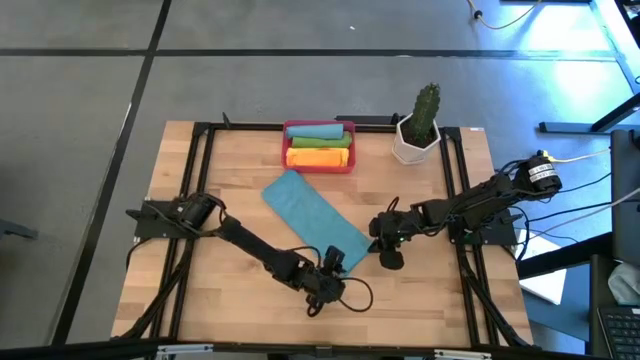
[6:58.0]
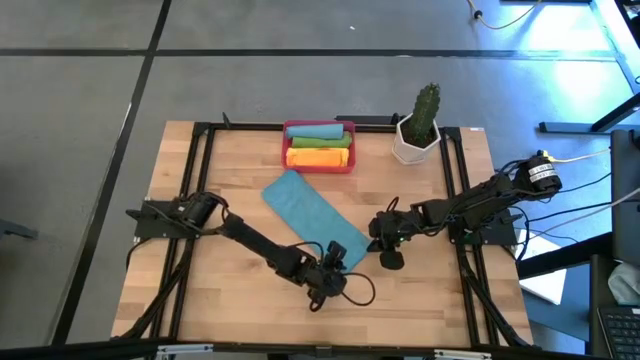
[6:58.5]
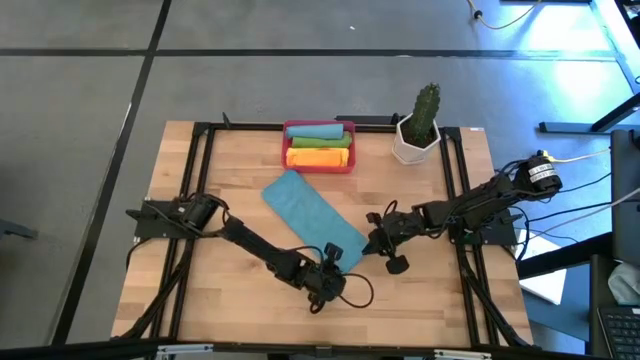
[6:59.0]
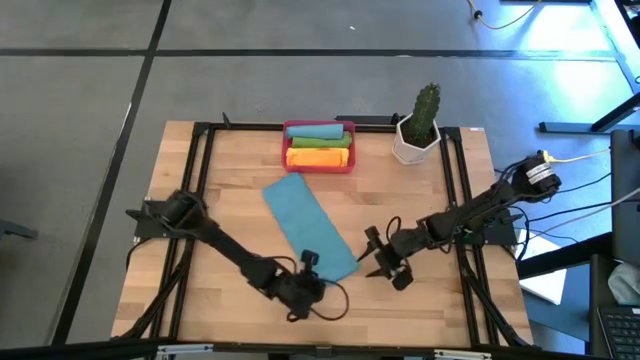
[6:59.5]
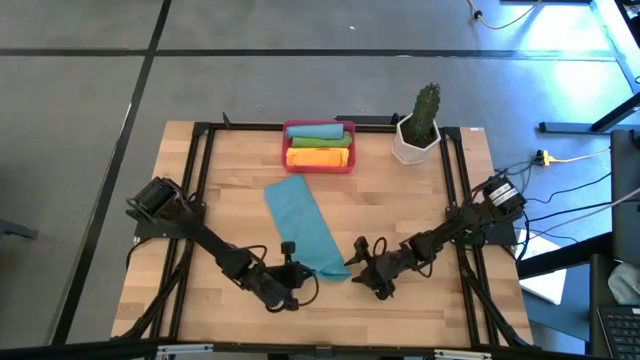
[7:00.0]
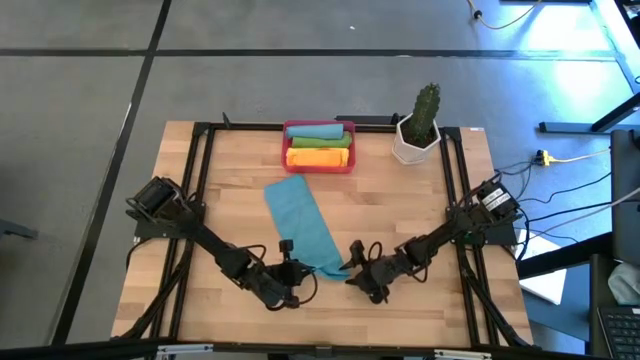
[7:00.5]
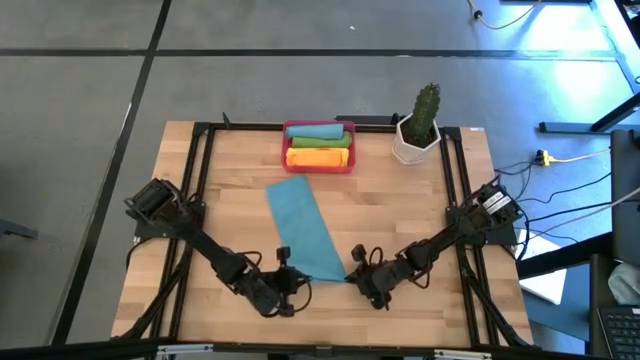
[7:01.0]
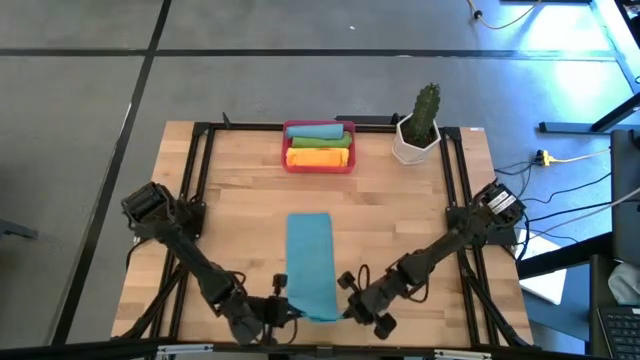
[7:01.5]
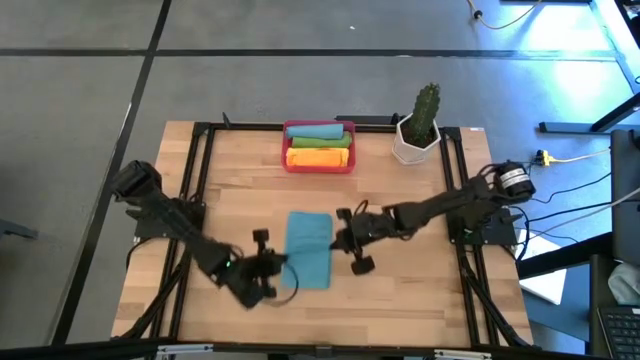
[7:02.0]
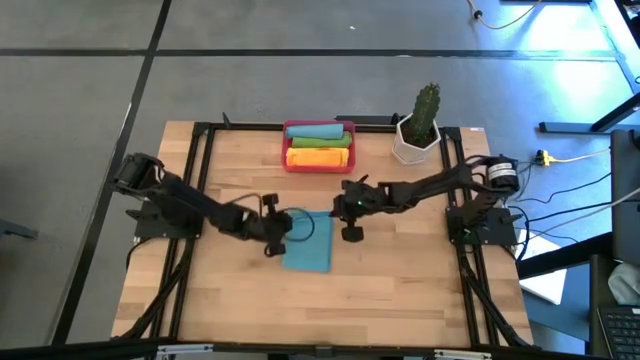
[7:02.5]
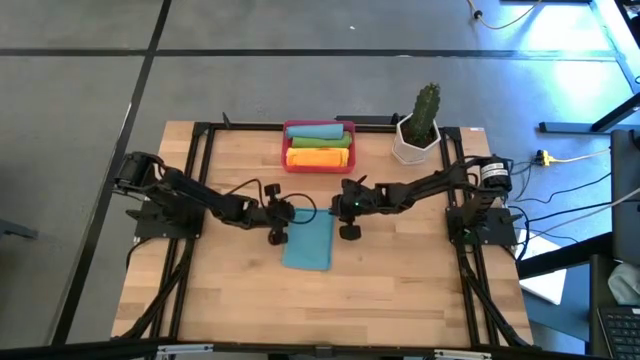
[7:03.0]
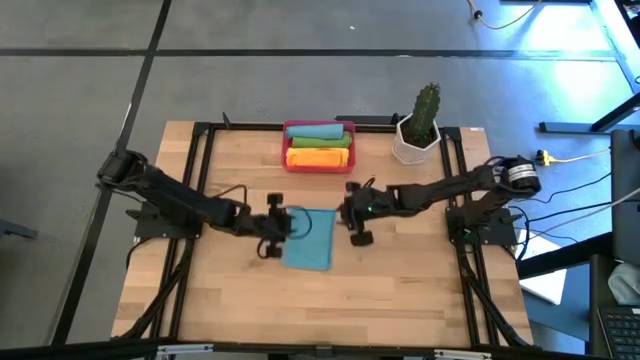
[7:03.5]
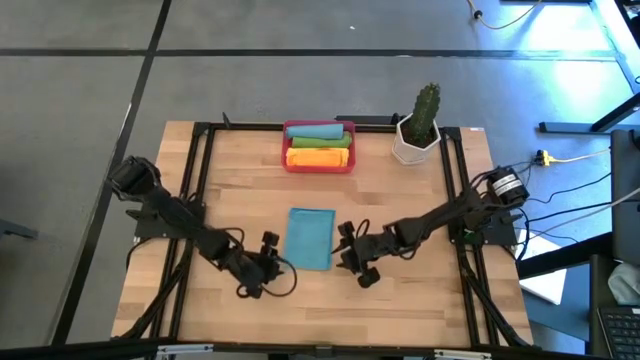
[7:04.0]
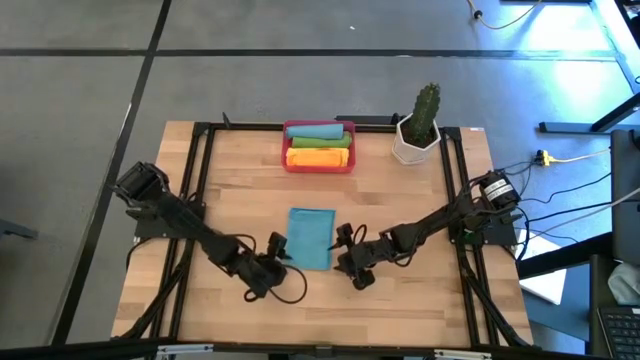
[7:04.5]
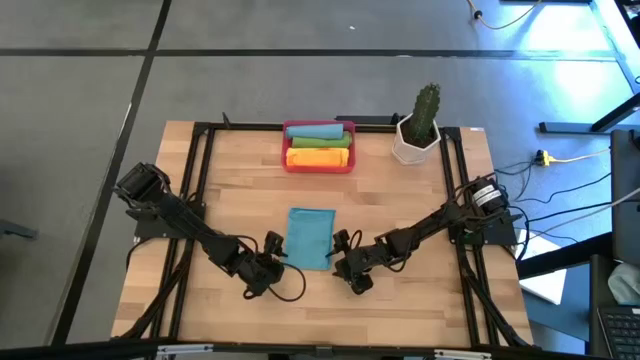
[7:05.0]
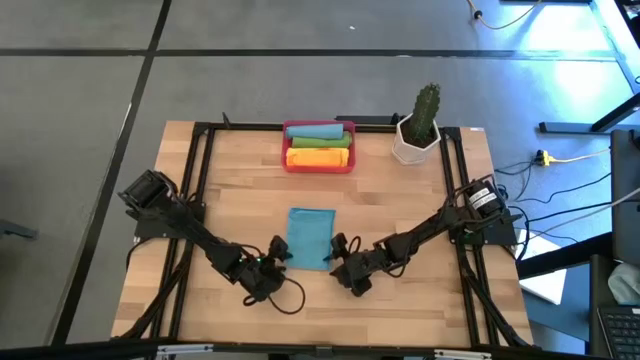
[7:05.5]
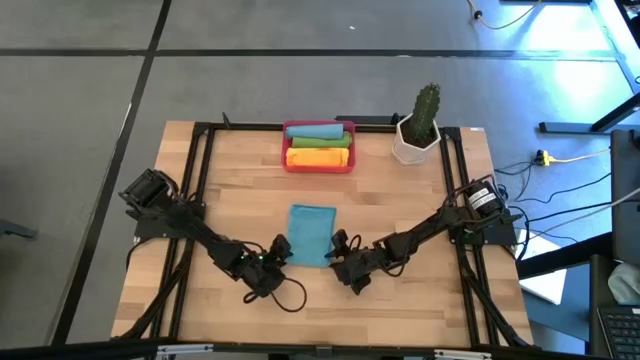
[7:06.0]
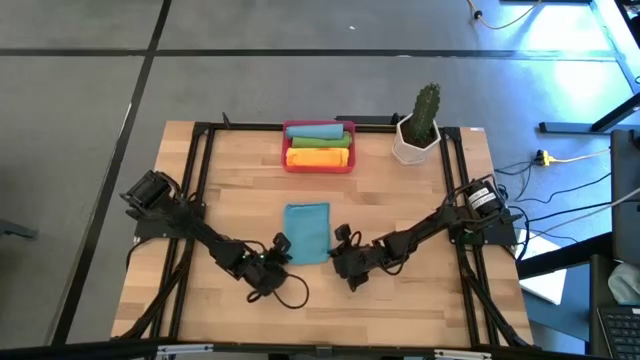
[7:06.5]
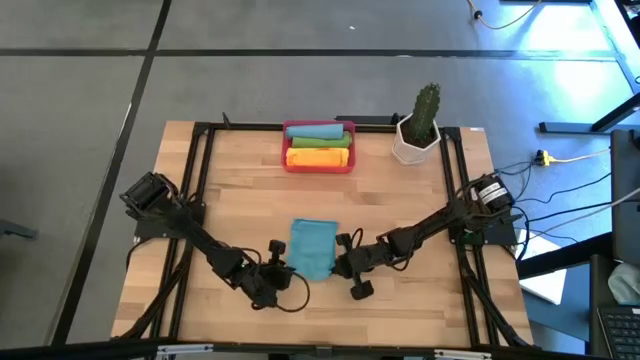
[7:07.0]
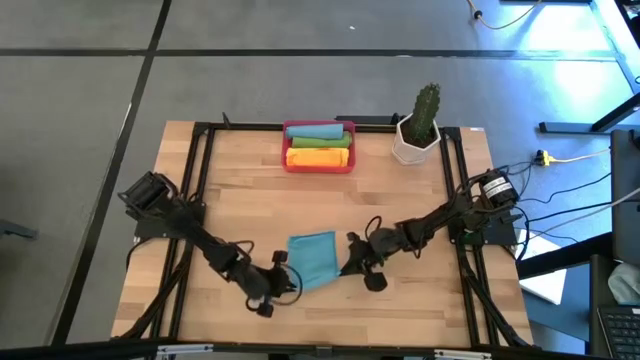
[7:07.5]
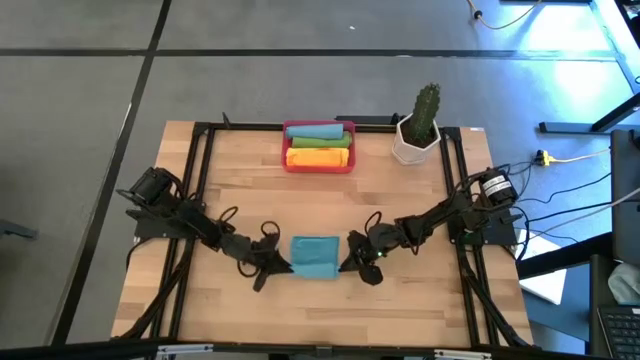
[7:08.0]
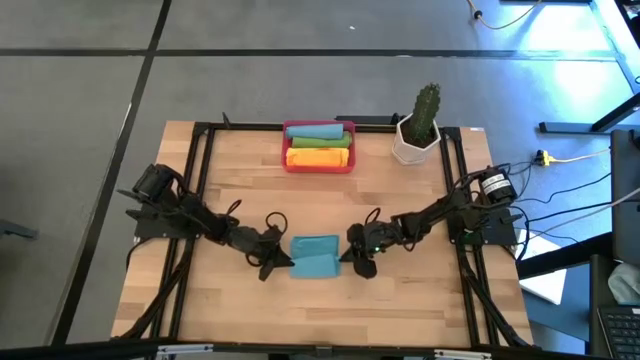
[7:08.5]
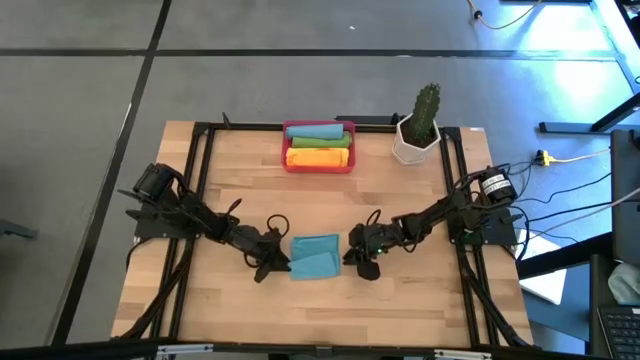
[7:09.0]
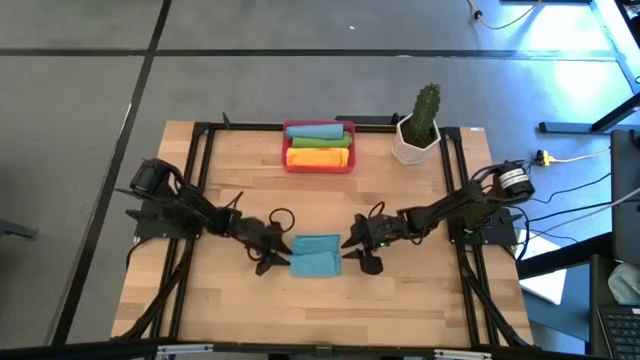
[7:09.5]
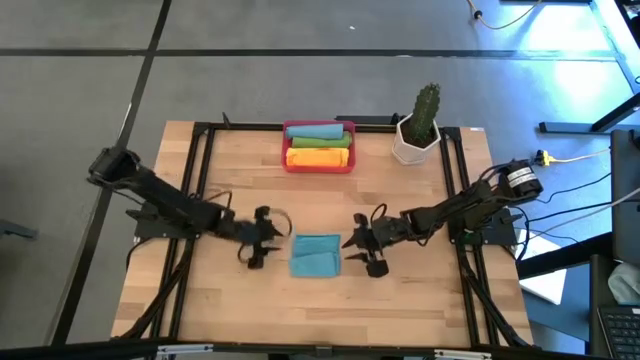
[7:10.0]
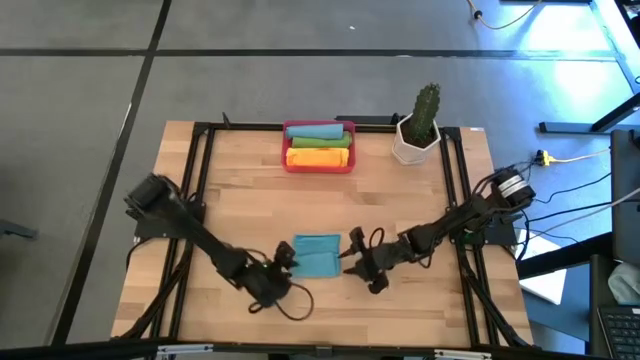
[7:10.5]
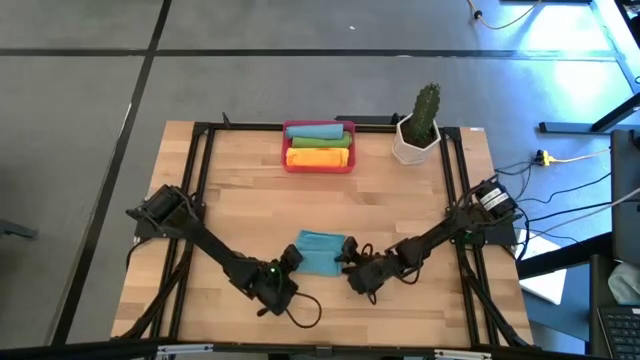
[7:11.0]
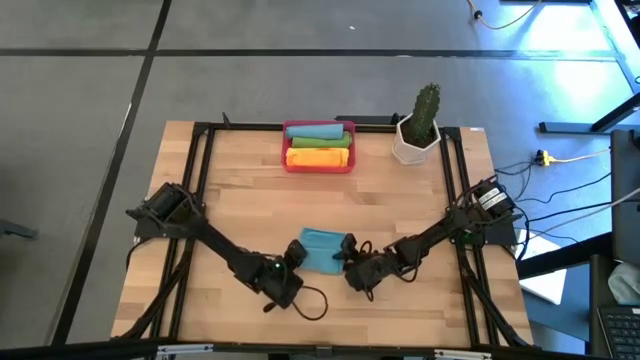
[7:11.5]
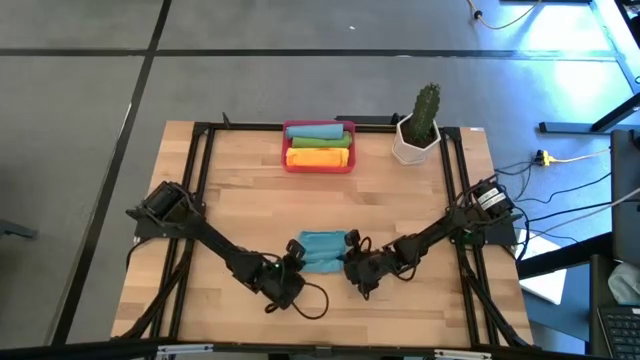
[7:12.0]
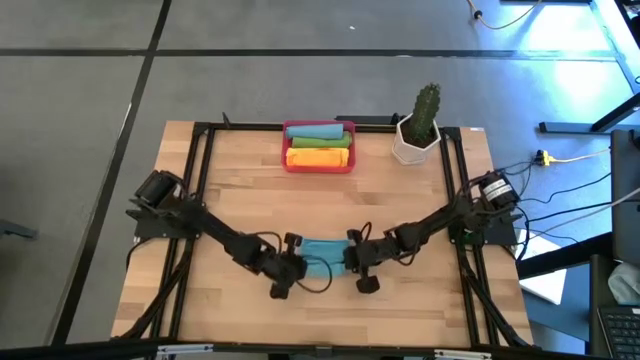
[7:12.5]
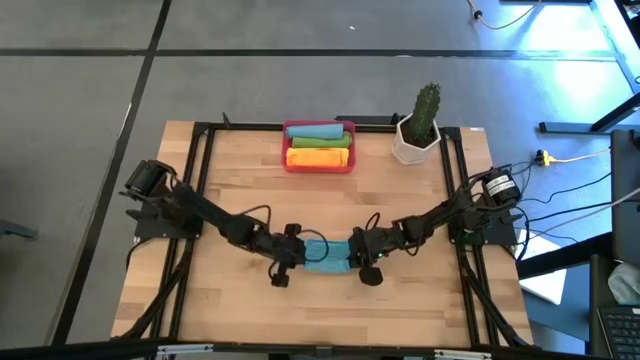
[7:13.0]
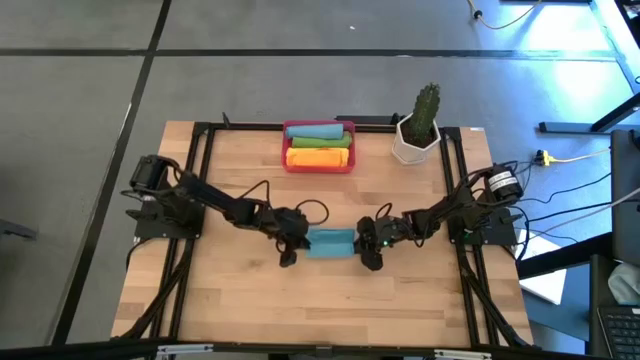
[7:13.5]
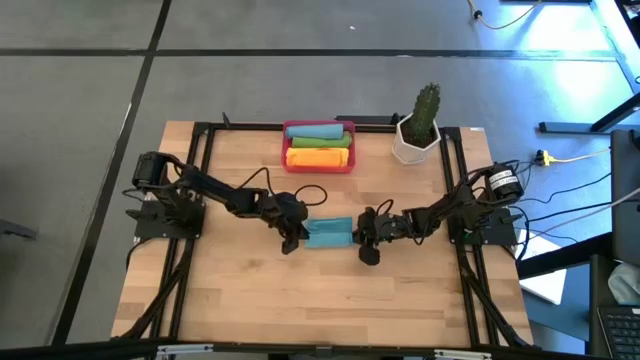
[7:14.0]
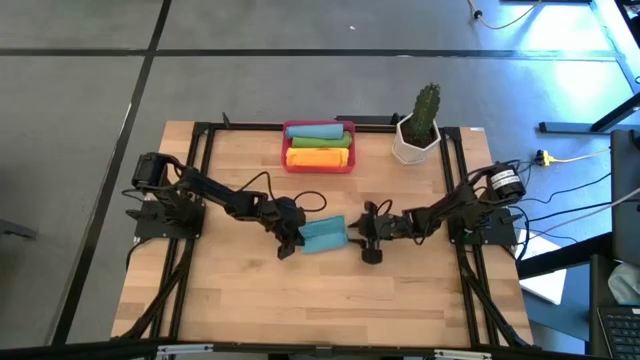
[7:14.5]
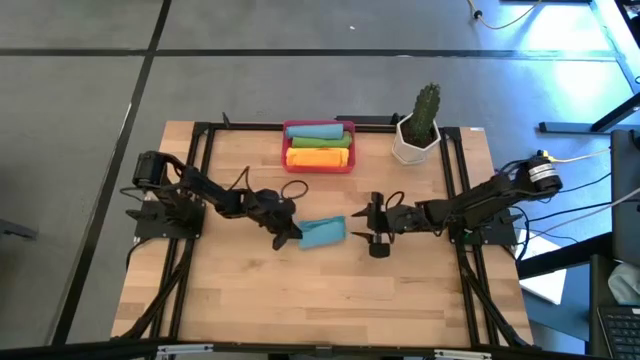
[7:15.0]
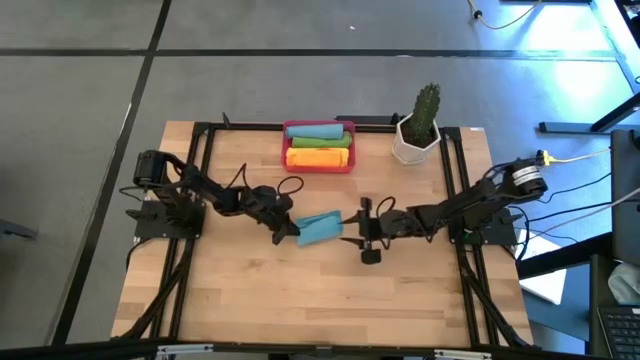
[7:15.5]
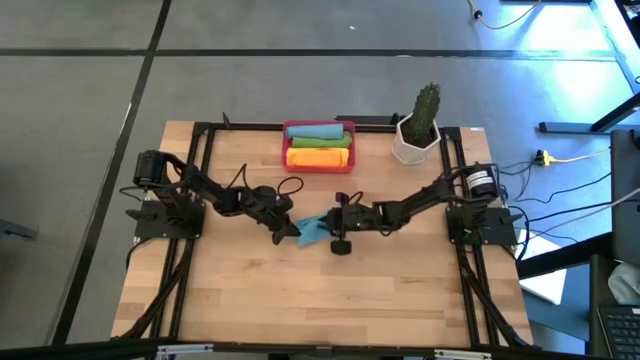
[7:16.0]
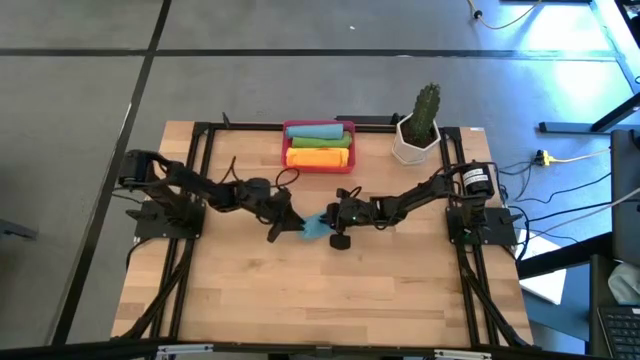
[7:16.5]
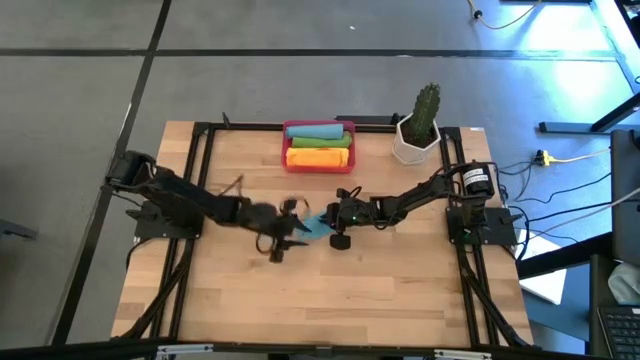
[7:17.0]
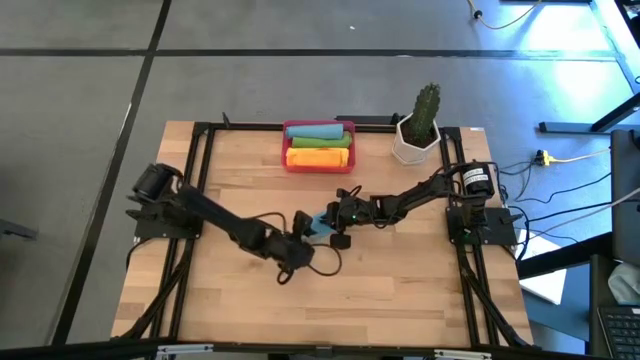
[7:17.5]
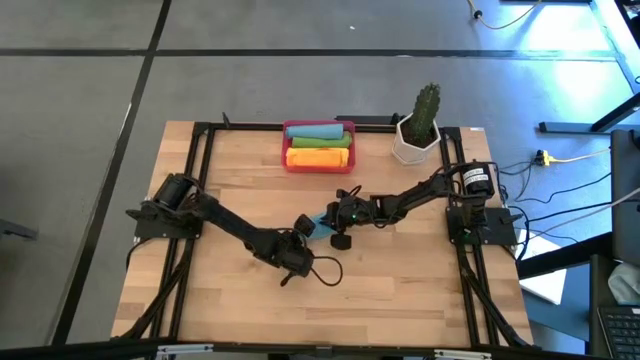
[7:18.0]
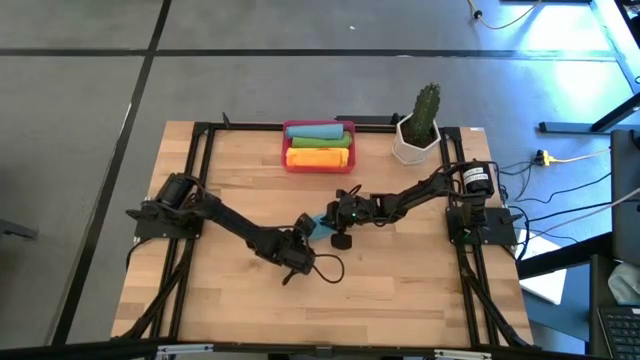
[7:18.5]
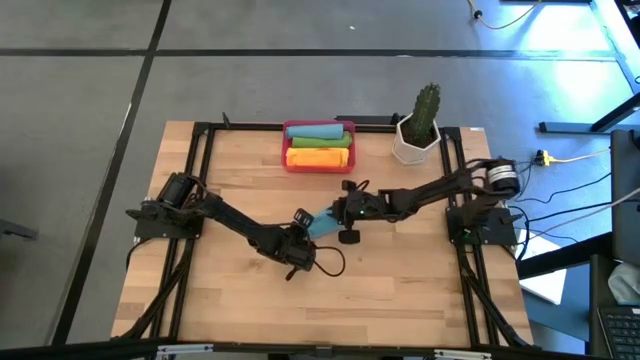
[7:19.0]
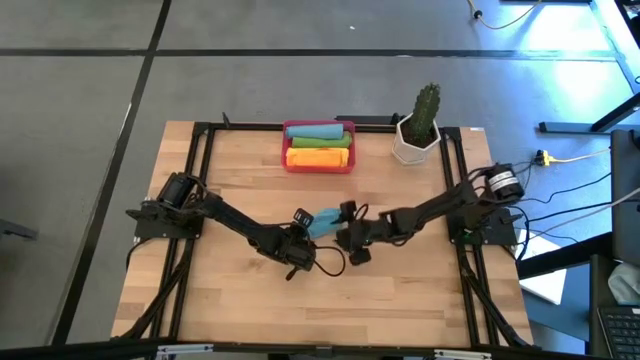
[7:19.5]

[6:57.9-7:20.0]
Task: Roll microfiber towels into tight, uniform cylinder then place into a basket
Roll the blue towel
